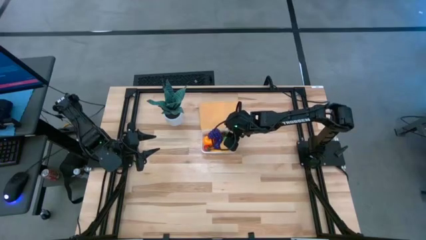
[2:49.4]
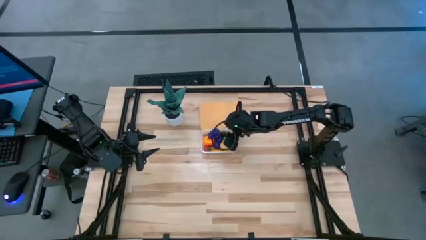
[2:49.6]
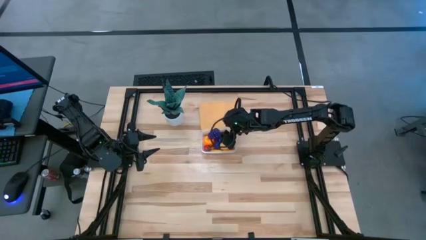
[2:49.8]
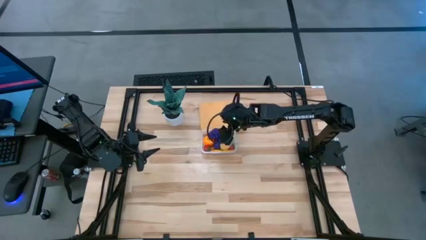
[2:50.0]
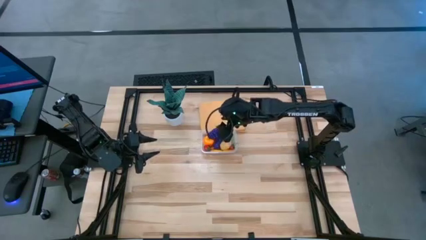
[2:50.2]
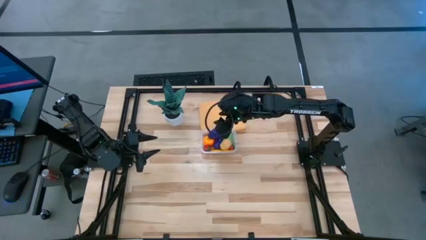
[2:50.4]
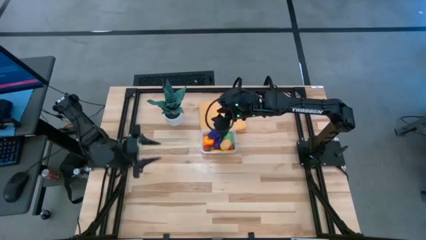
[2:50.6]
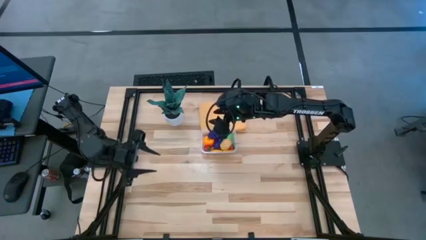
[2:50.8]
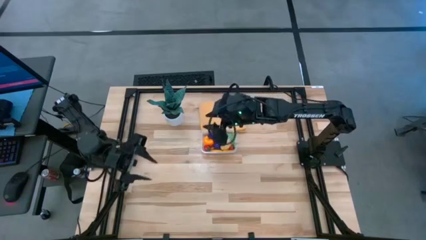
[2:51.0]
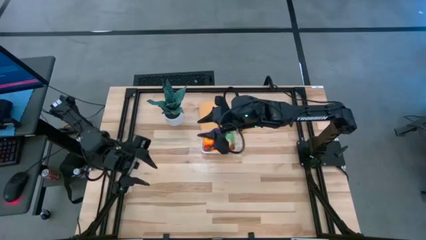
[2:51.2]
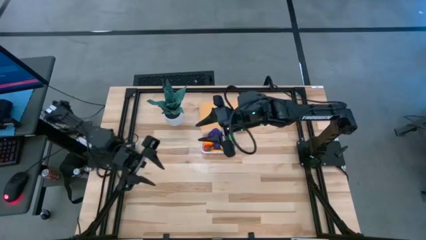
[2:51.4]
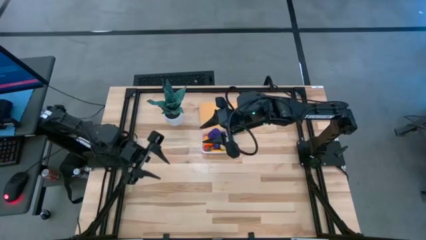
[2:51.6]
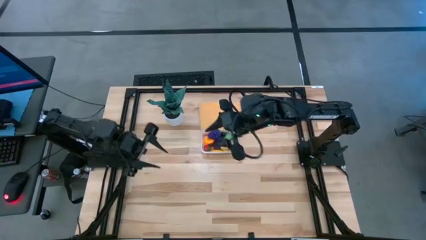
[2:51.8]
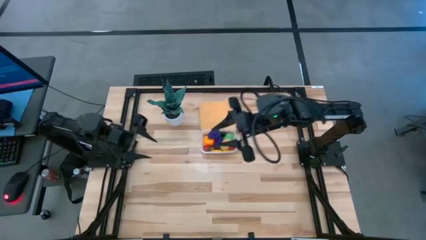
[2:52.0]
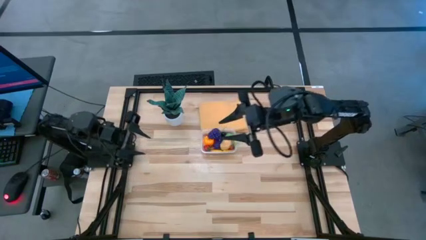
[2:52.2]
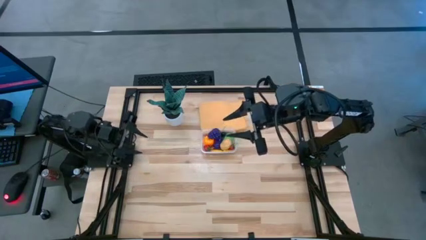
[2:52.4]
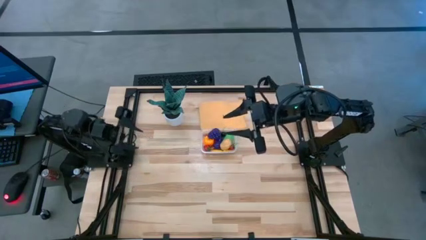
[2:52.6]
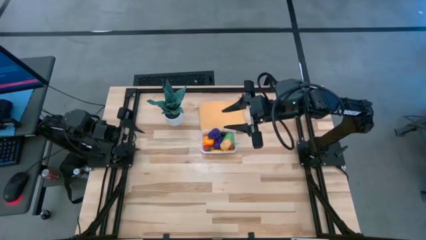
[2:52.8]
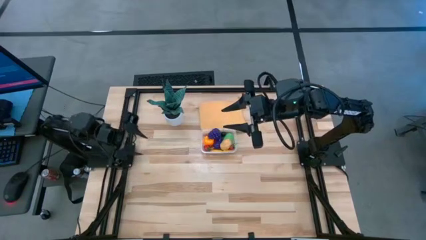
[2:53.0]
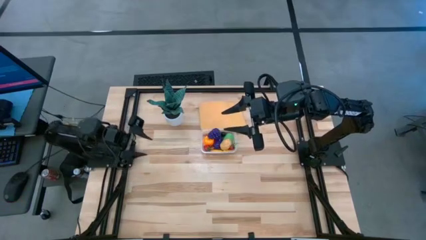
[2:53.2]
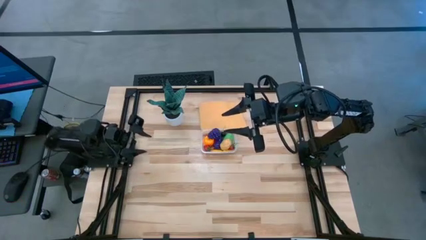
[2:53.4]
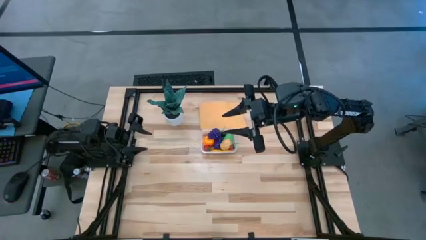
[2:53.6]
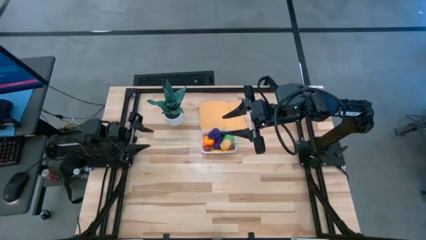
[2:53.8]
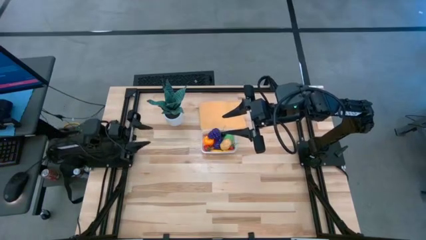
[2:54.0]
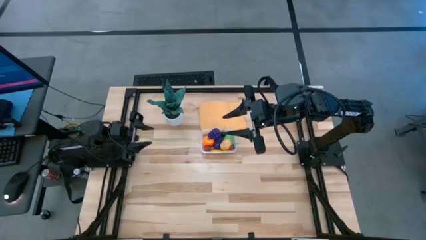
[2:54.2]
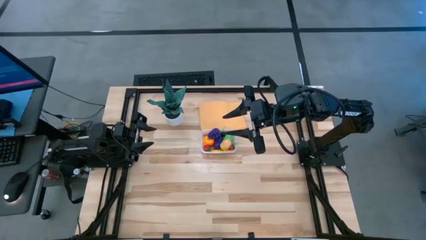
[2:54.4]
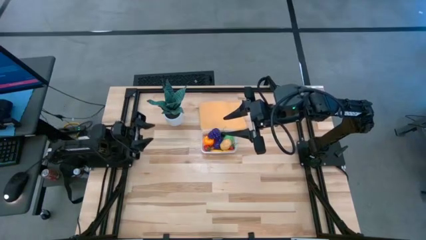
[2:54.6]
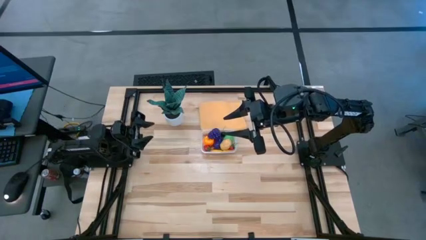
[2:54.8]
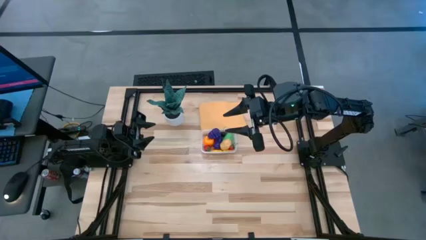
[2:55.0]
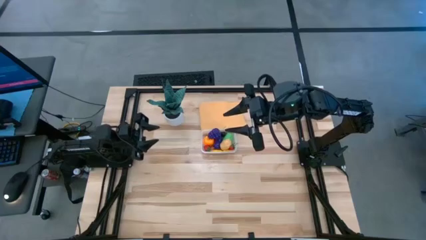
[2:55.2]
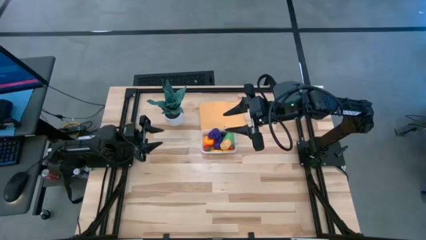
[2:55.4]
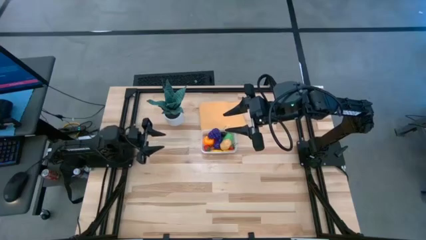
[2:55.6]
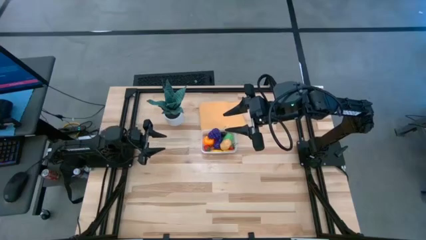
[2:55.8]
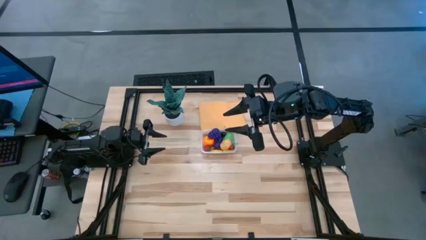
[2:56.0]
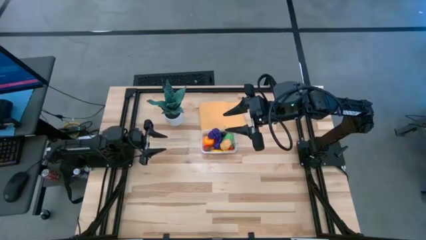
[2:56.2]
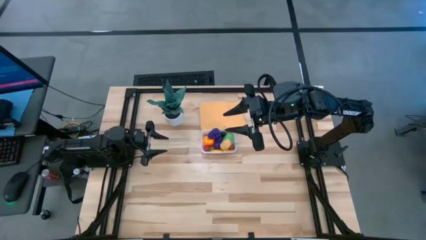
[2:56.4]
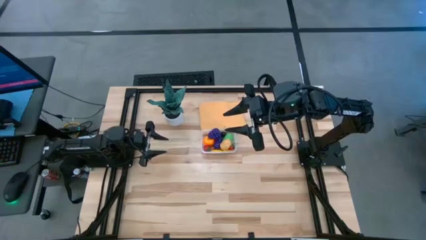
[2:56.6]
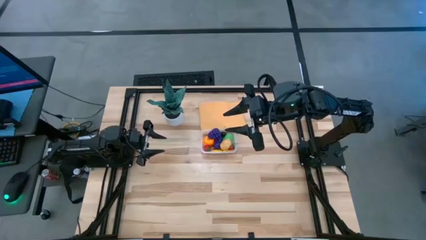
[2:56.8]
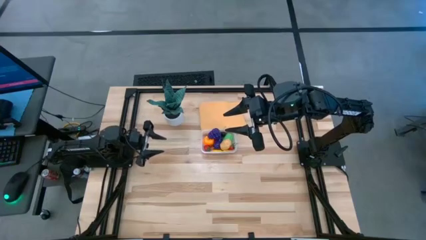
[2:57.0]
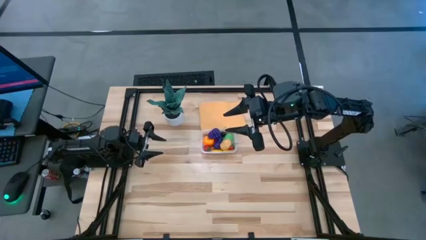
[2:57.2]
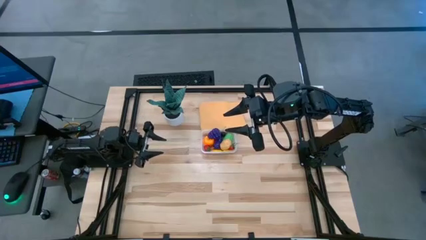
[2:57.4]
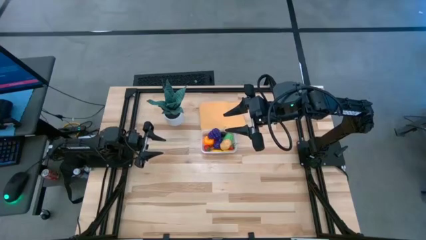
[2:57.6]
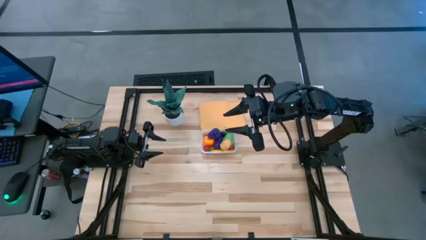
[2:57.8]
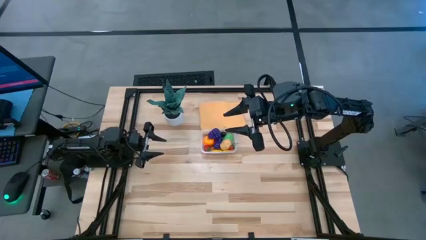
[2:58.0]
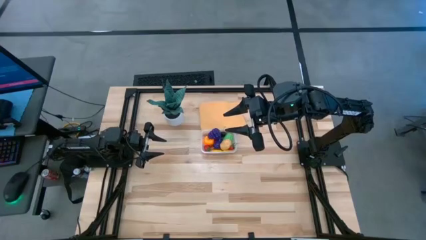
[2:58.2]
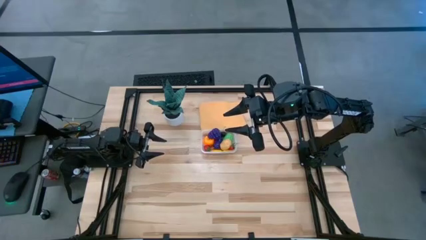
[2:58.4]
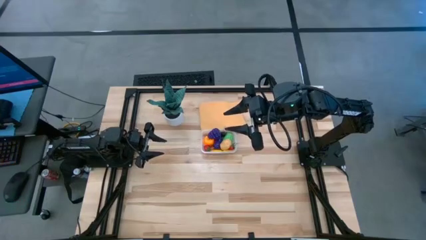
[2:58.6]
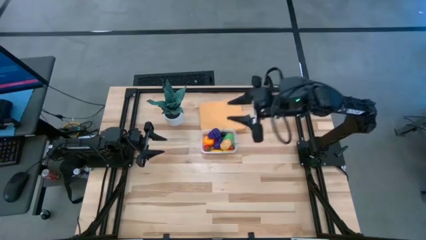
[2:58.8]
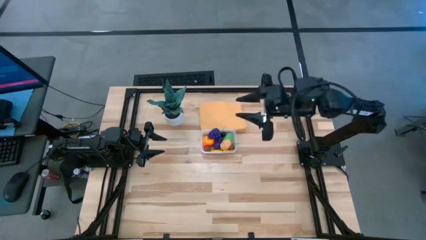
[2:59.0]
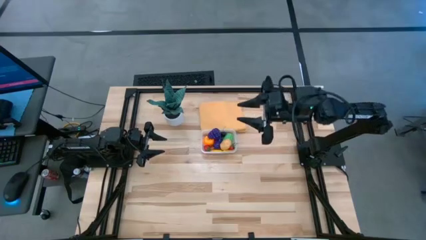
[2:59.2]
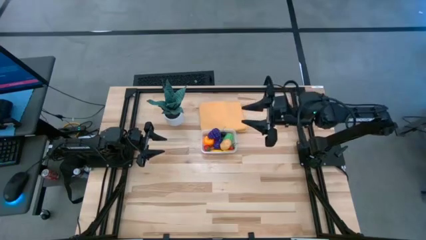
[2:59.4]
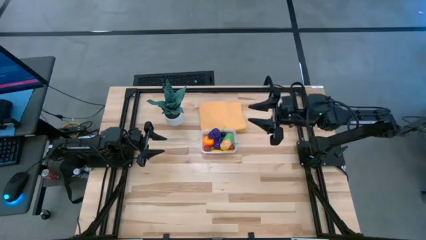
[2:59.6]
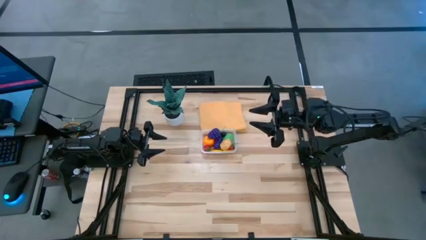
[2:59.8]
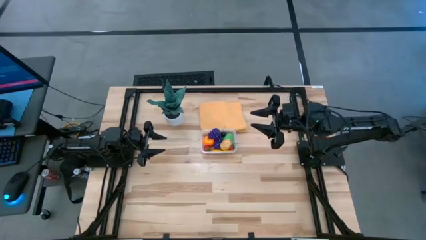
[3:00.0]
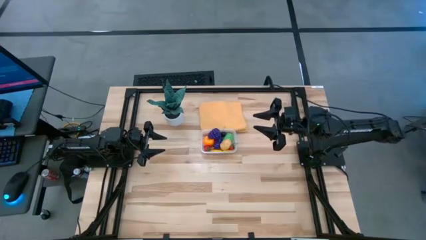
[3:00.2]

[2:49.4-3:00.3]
Task: Pick and placing Produce into tupperware
Return to Home Position

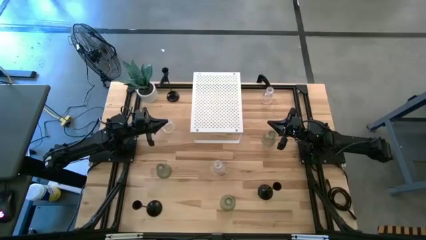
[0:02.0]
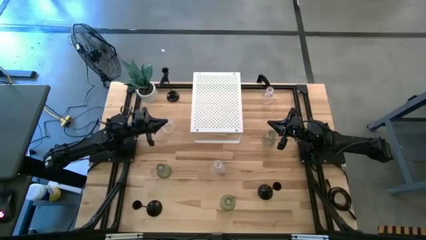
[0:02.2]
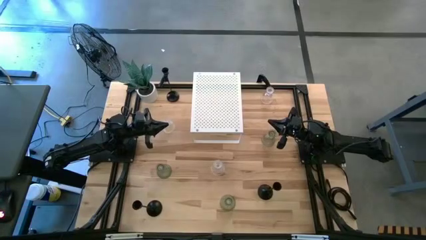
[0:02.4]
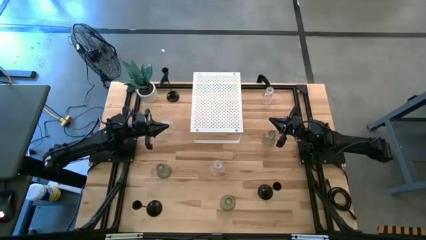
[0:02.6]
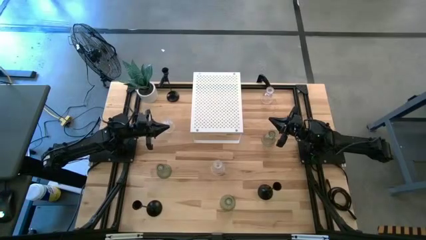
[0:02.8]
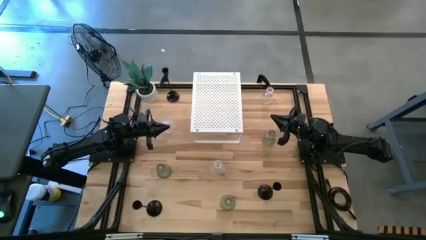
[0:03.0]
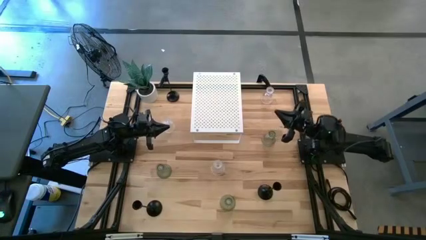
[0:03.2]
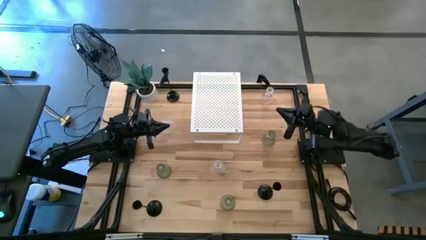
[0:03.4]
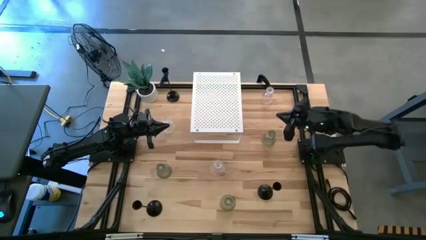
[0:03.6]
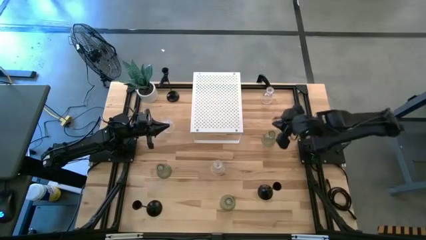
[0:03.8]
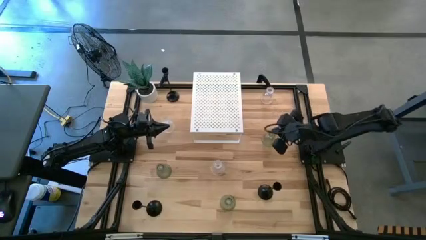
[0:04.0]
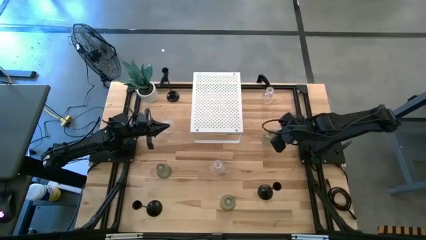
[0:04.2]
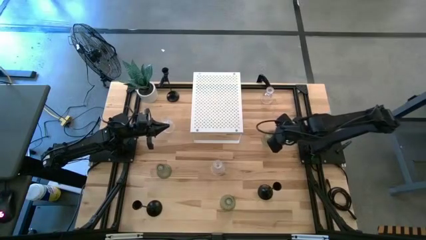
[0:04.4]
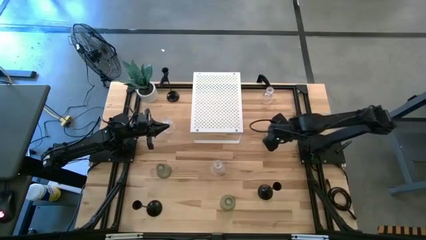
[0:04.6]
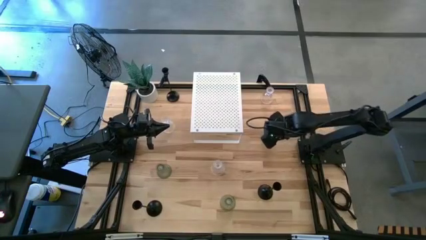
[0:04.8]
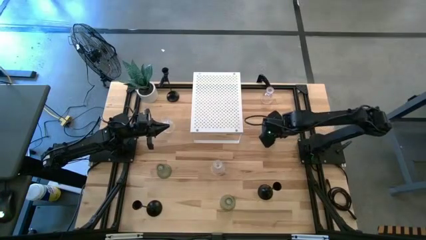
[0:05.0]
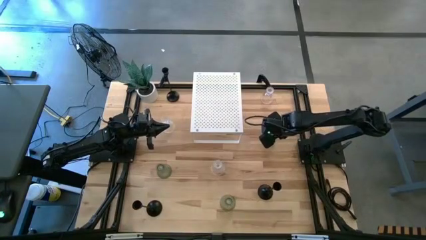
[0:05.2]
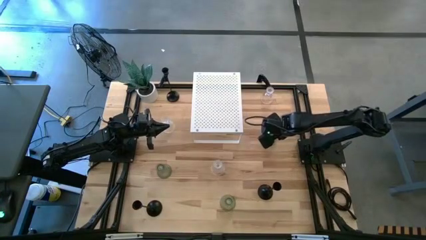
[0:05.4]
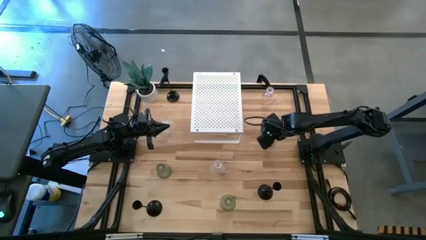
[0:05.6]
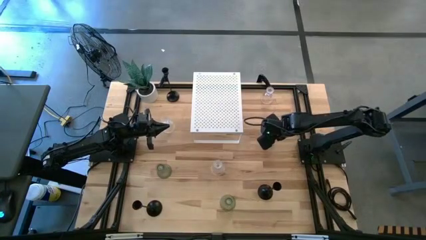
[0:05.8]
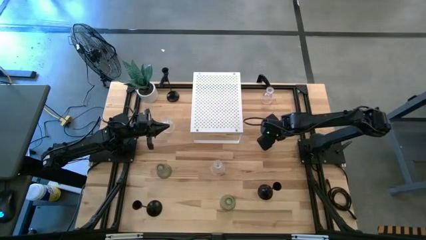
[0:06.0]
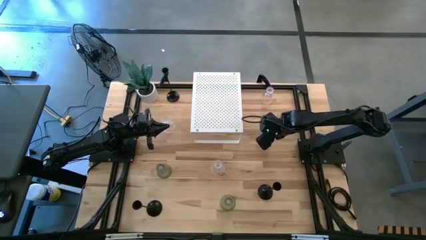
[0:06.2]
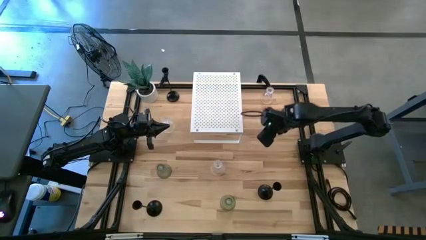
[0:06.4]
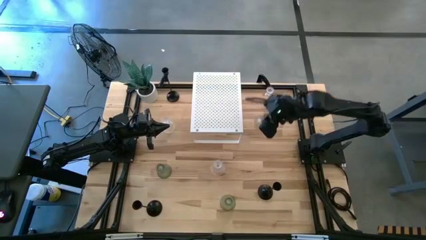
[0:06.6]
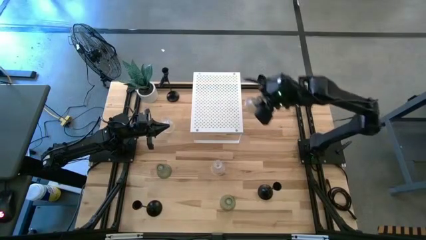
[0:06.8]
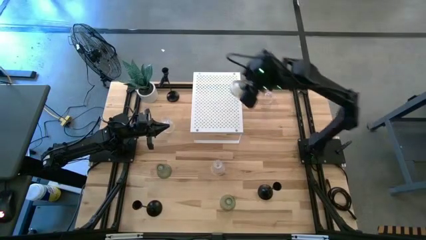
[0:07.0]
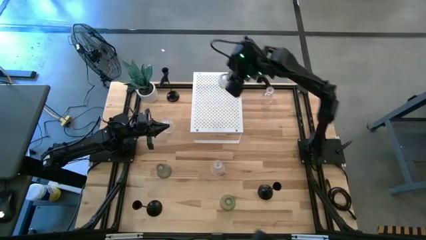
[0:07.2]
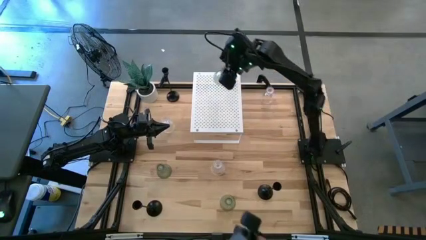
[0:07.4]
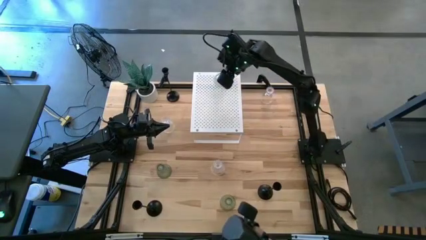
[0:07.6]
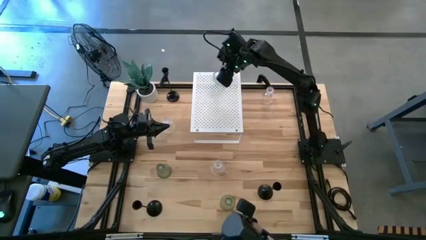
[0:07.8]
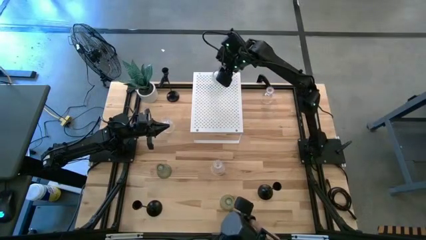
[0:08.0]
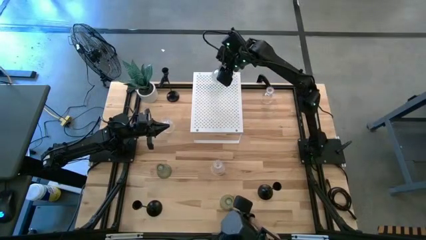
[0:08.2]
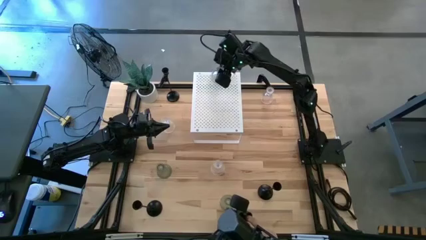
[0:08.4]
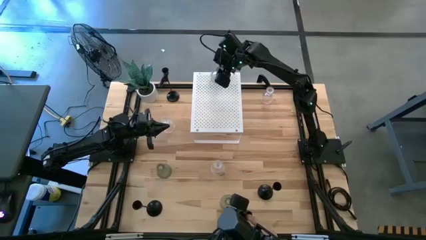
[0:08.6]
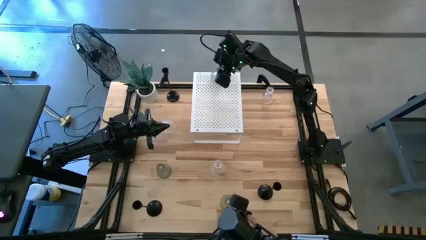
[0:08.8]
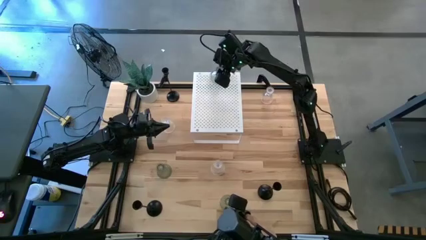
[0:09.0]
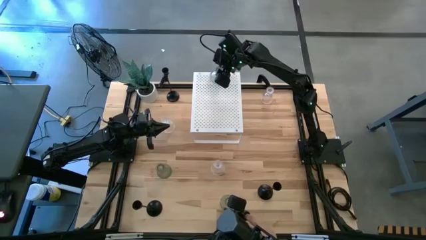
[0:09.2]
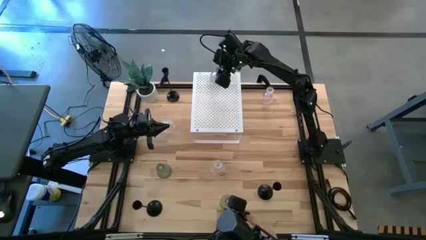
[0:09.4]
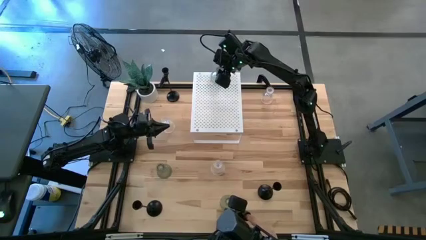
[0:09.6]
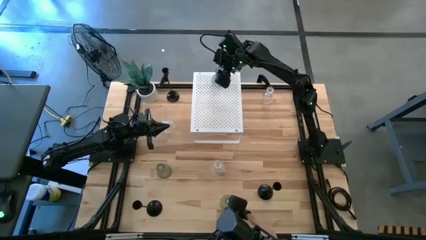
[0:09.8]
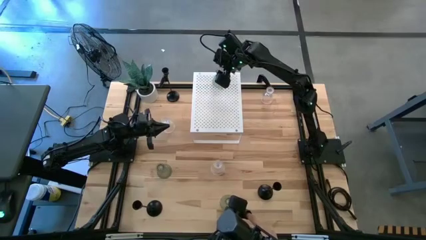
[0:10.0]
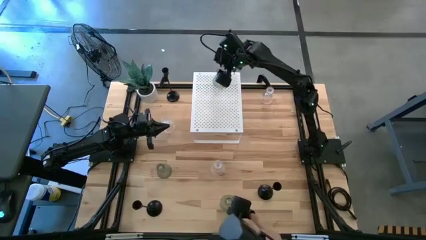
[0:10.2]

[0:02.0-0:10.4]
Task: Pick & Place candle stick holders
Put the top right green candle holder on the shelf
